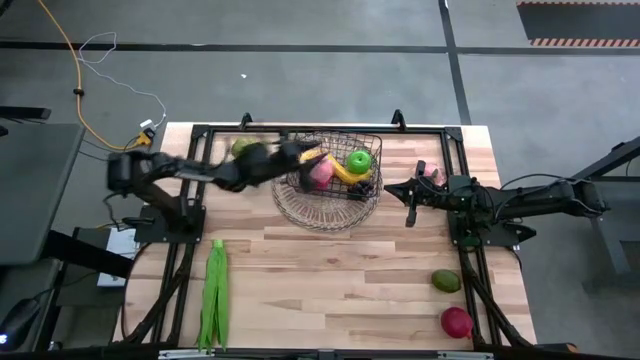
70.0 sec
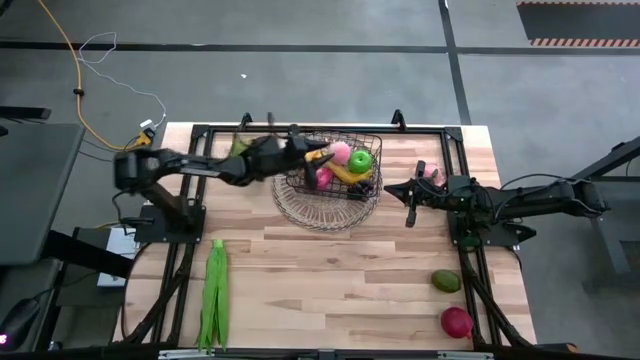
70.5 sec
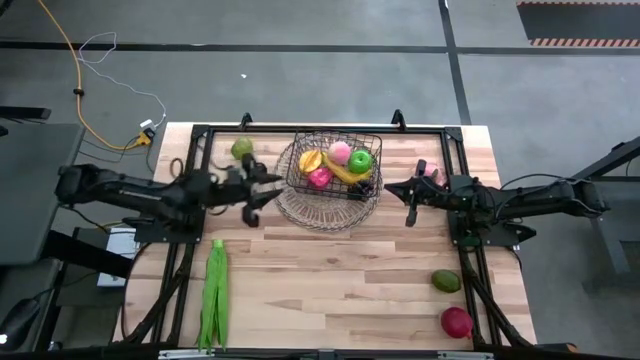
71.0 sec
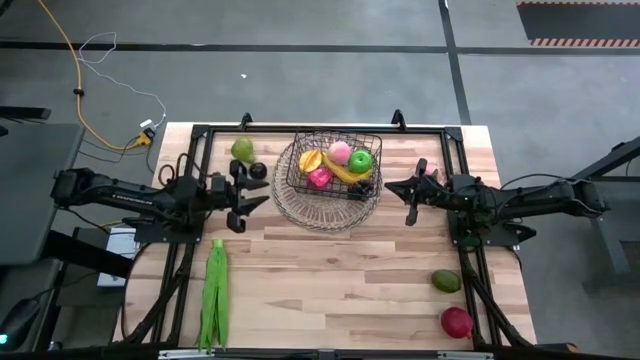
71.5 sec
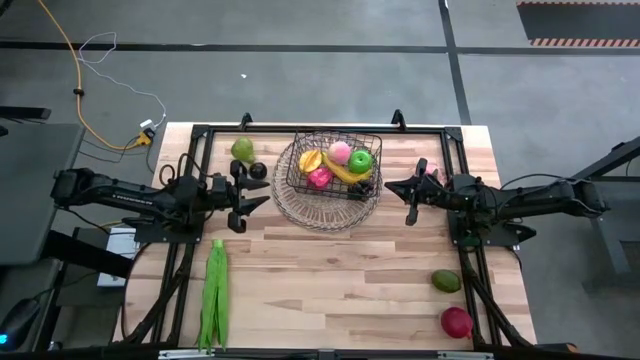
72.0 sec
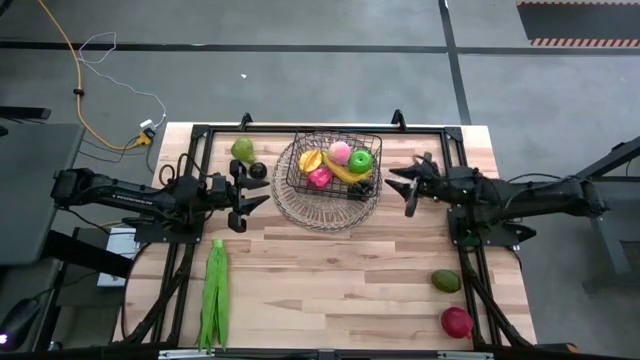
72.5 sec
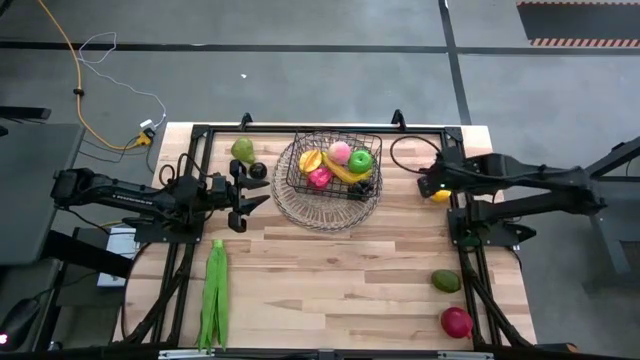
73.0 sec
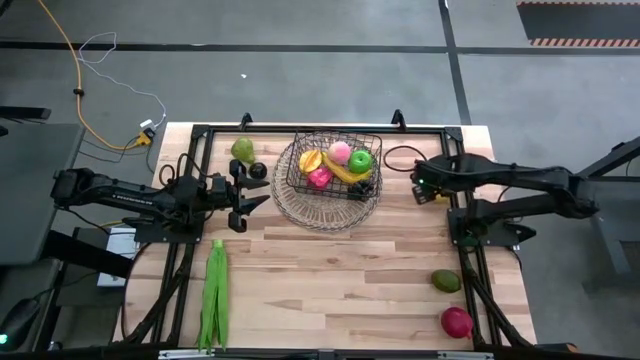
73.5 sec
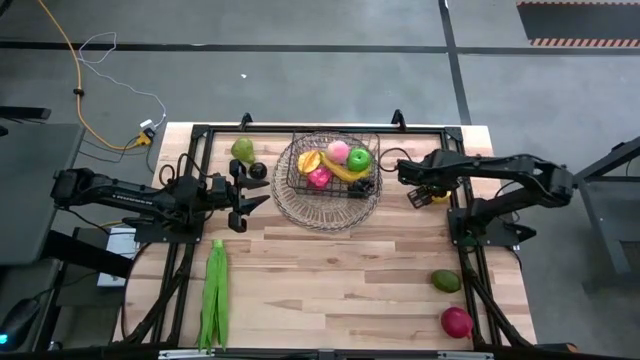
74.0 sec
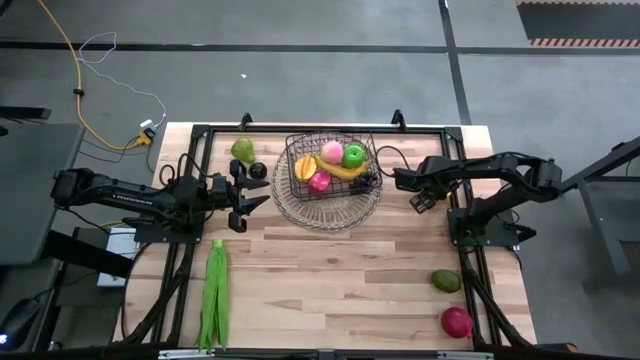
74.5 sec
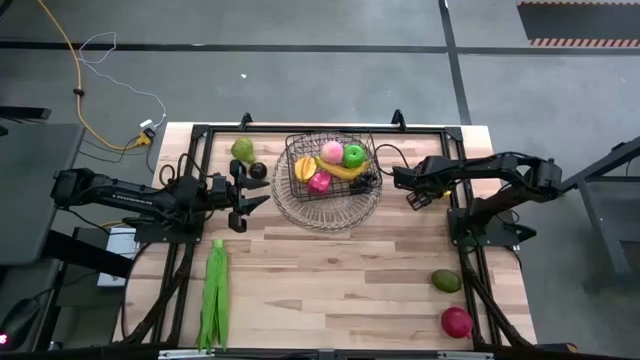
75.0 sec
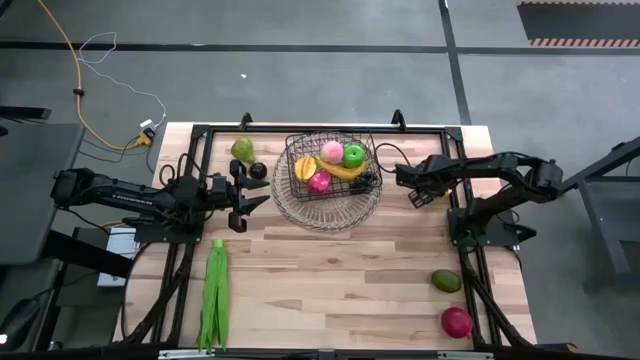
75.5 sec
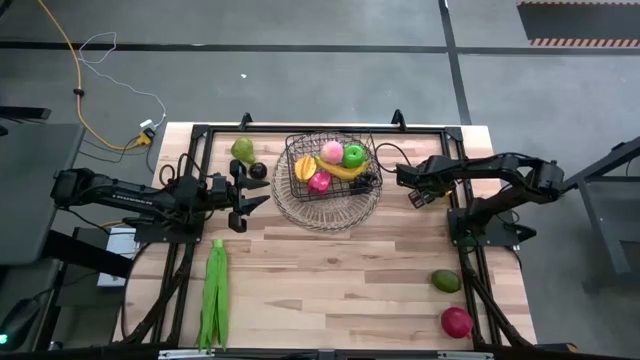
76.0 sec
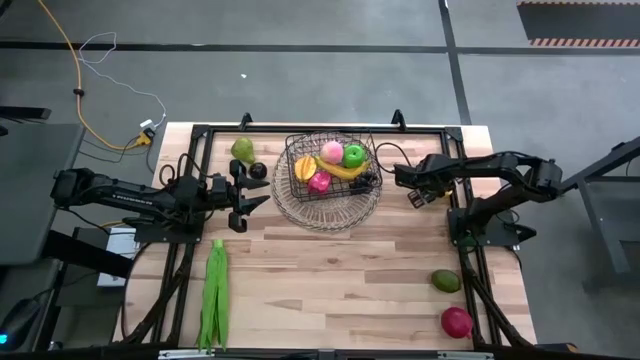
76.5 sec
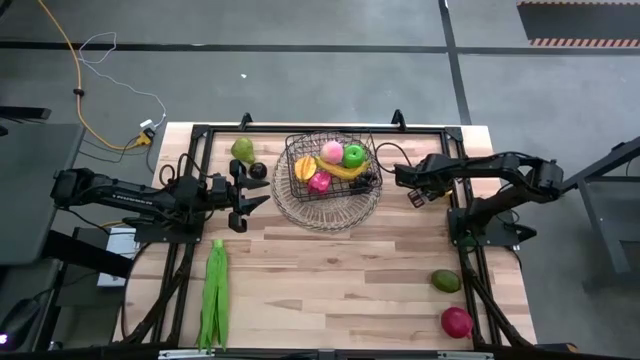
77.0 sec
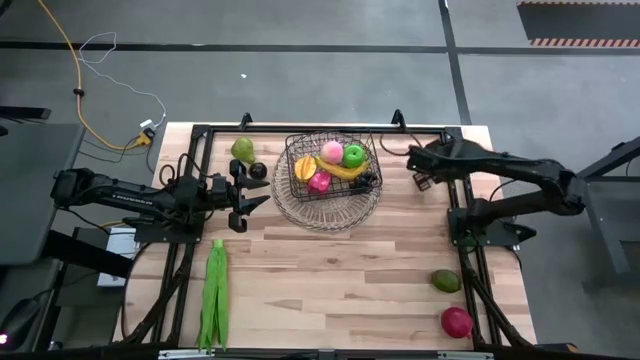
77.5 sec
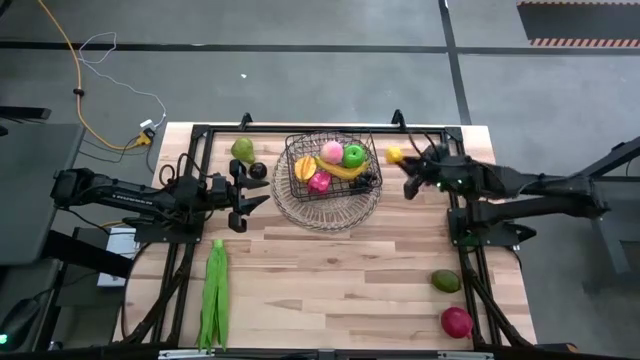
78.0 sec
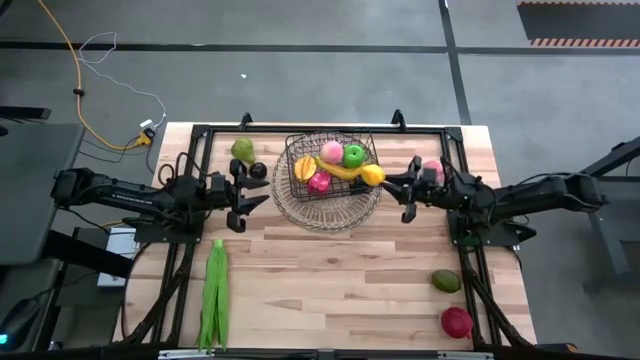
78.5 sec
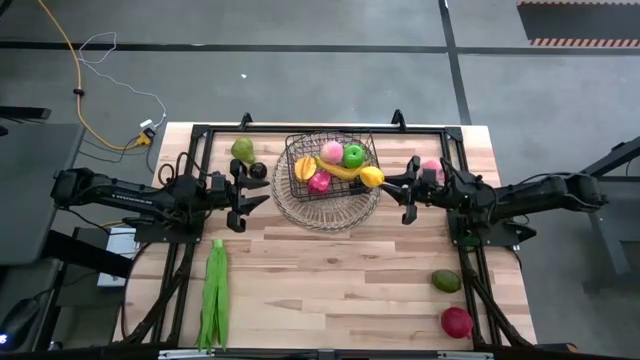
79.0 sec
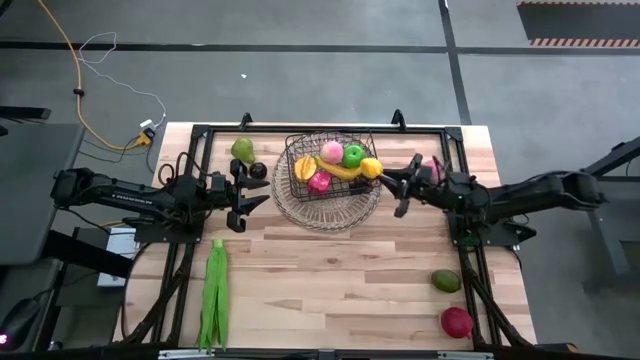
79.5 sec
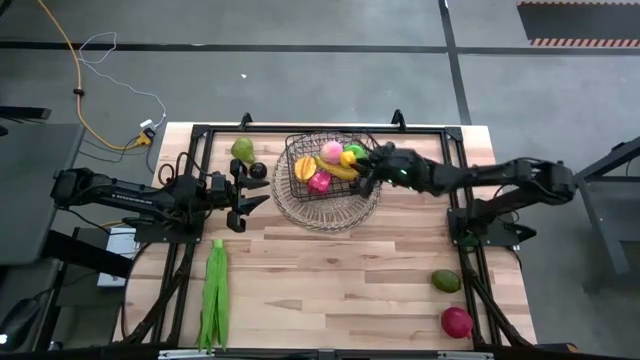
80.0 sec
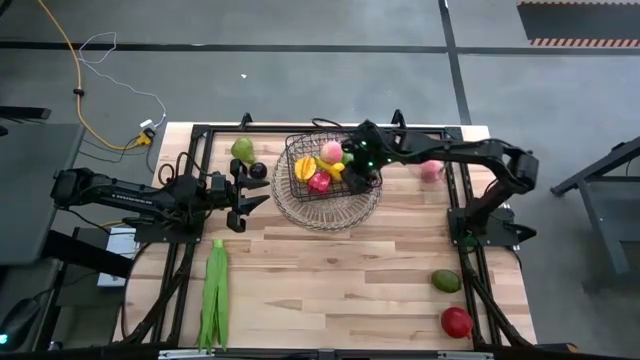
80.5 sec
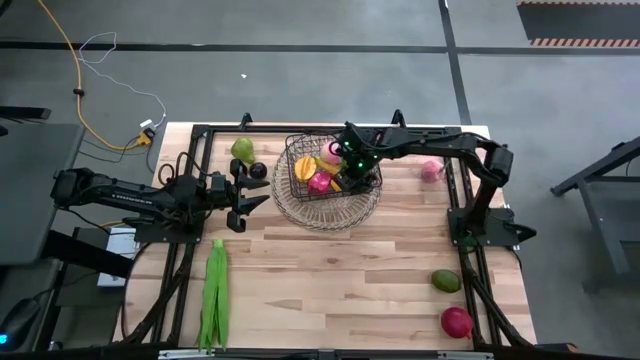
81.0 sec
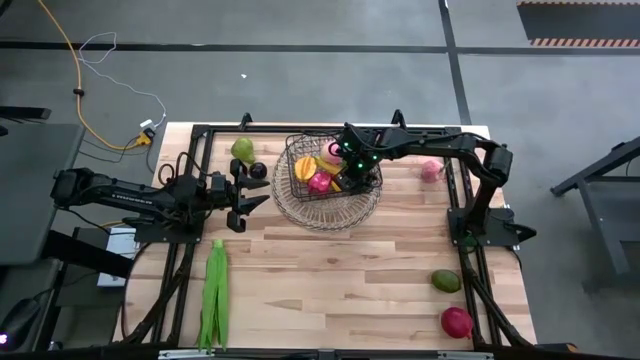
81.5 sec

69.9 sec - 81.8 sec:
Task: Build produce basket
Put the lemon into the wire basket

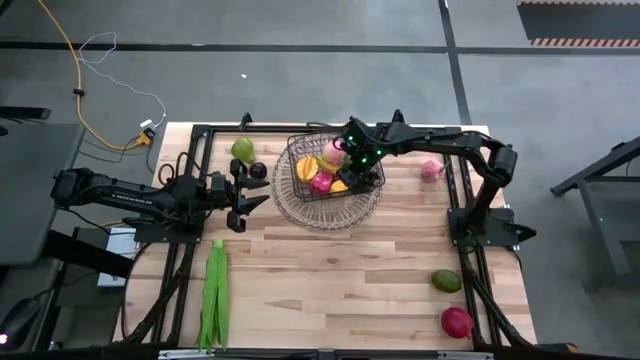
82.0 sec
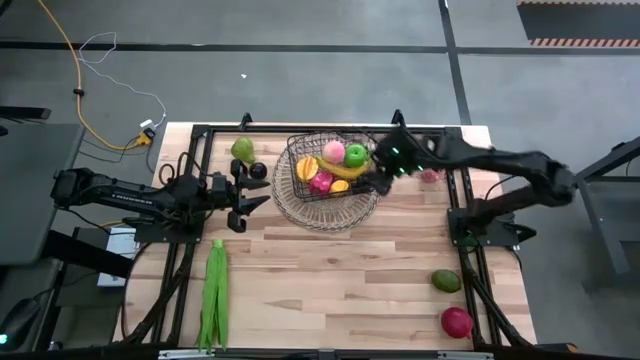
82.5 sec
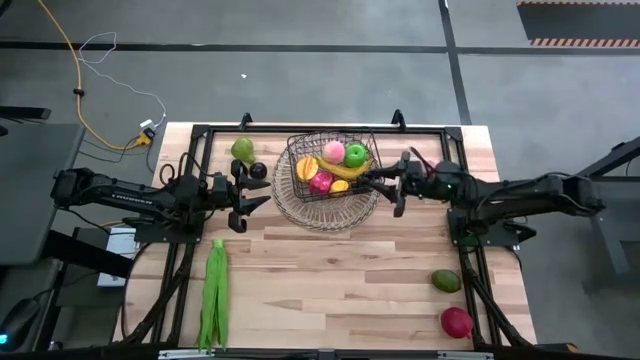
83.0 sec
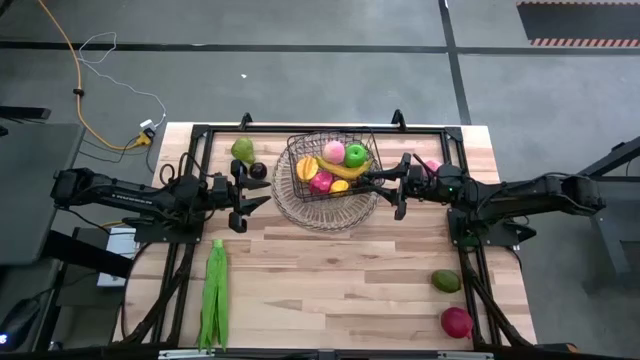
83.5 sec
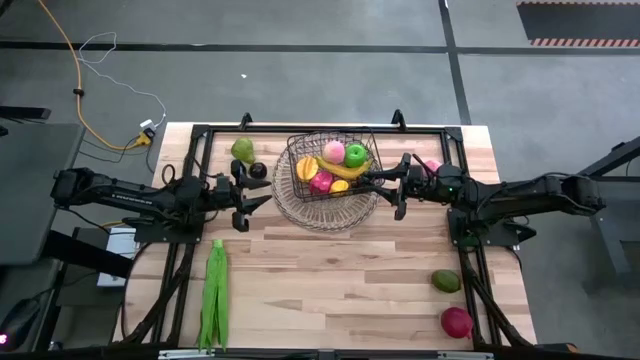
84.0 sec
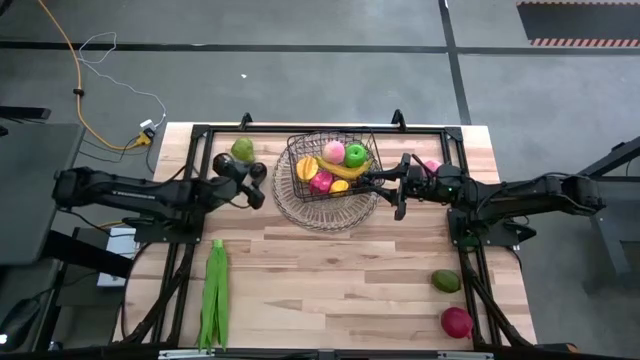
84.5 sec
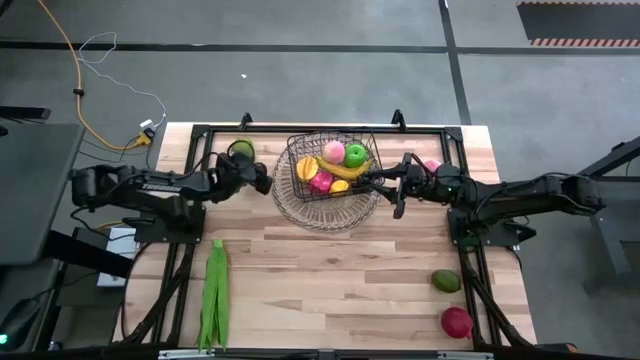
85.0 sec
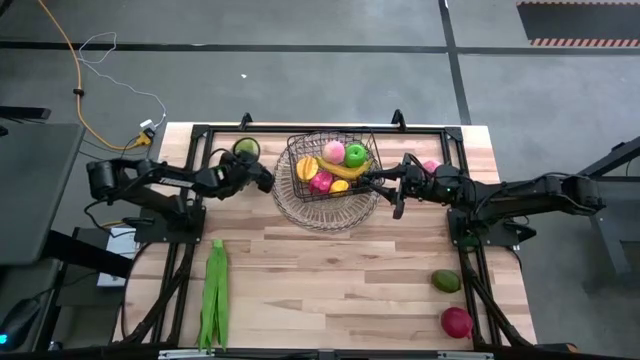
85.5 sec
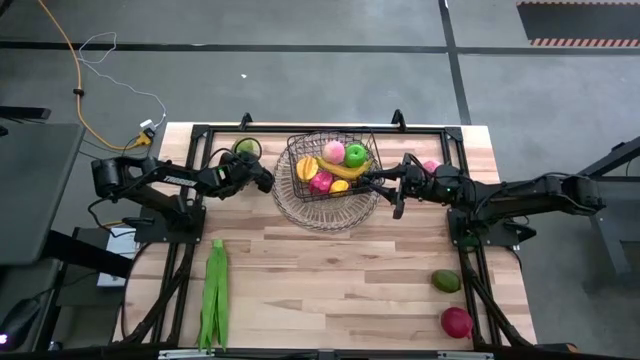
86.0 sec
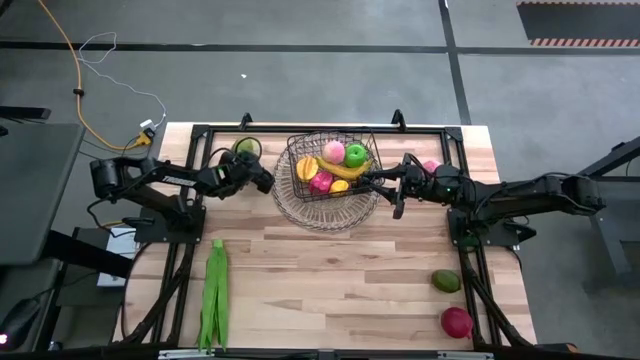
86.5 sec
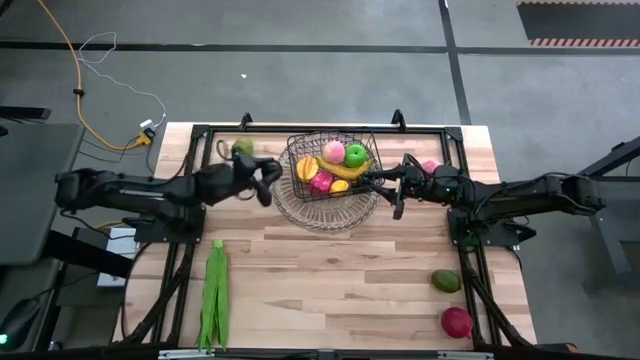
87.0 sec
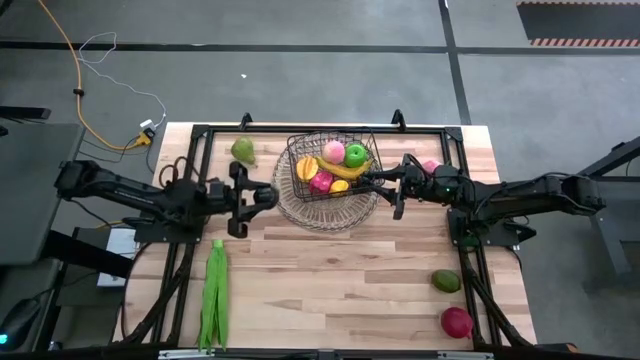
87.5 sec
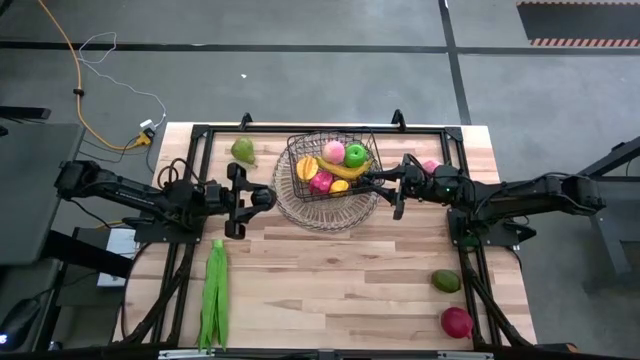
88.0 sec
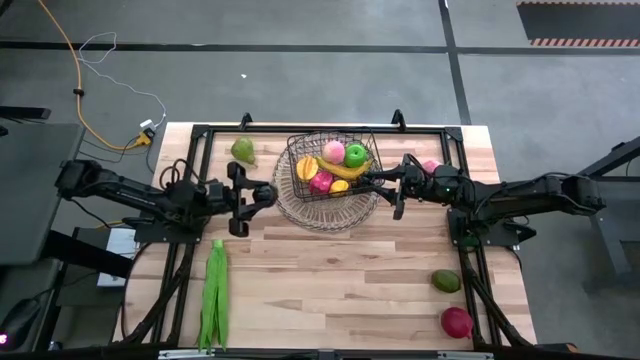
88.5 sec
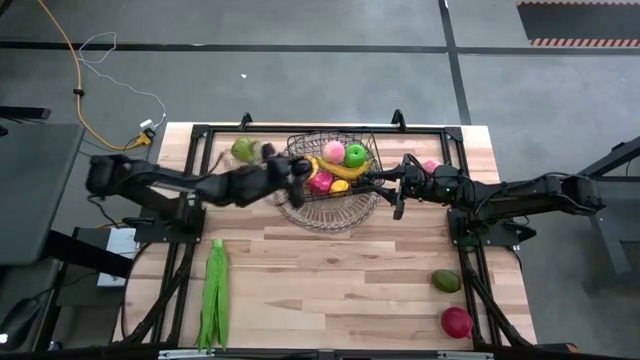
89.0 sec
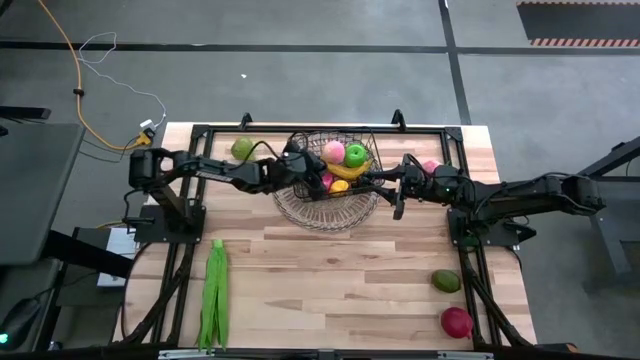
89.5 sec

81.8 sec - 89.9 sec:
Put the black plum into the wire basket
